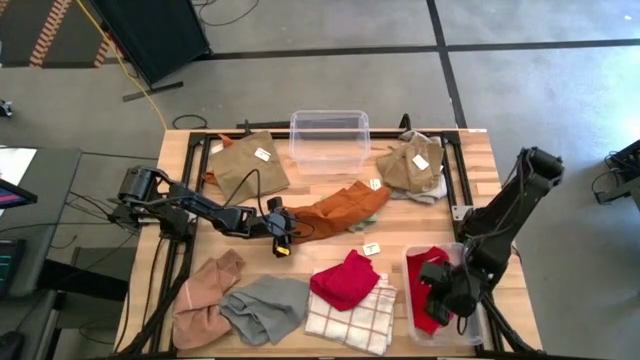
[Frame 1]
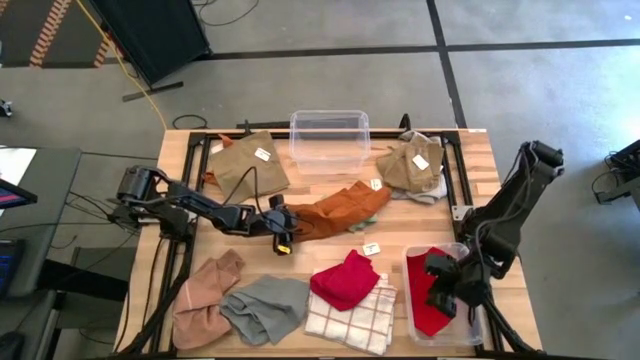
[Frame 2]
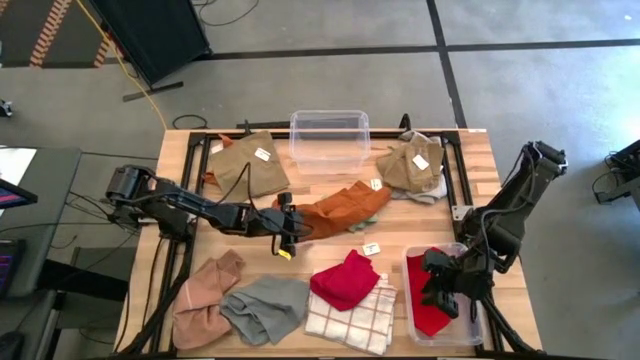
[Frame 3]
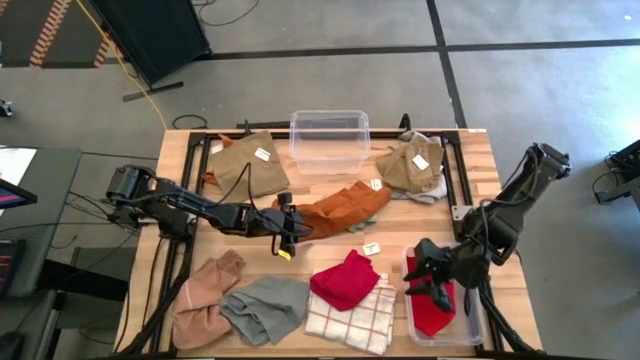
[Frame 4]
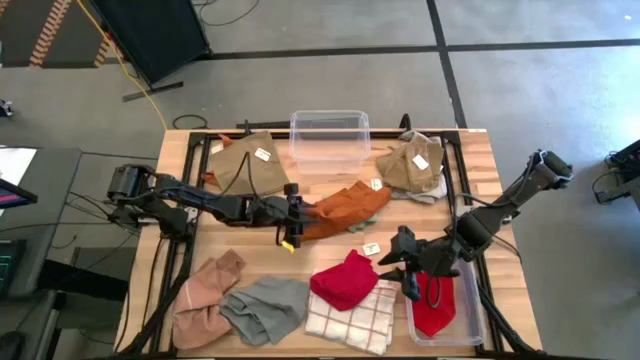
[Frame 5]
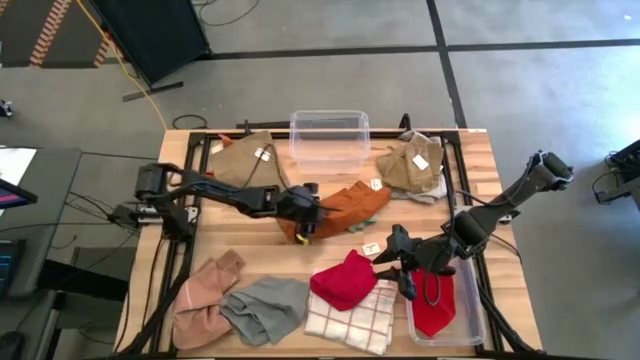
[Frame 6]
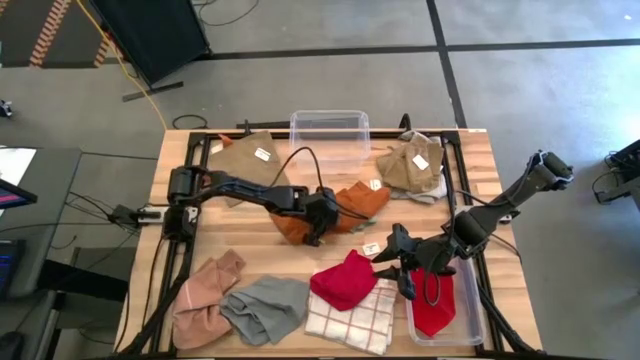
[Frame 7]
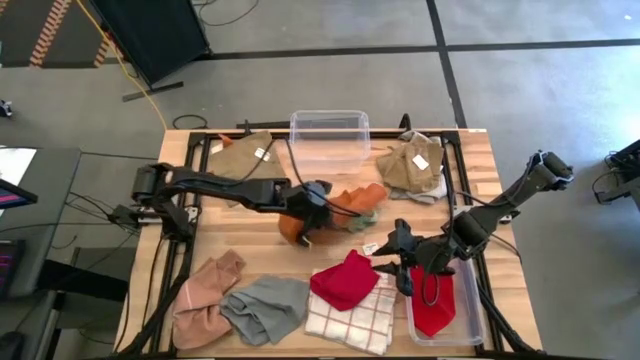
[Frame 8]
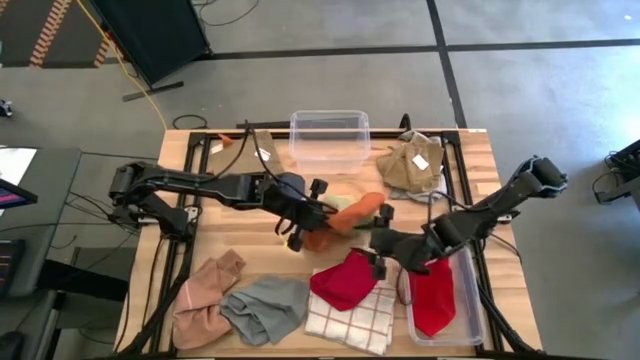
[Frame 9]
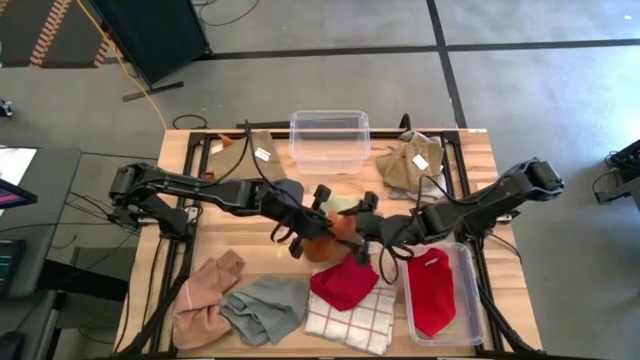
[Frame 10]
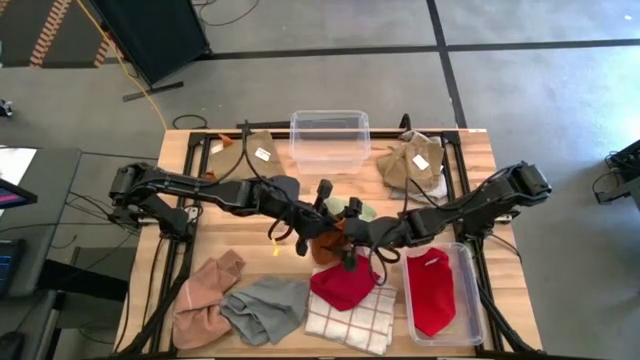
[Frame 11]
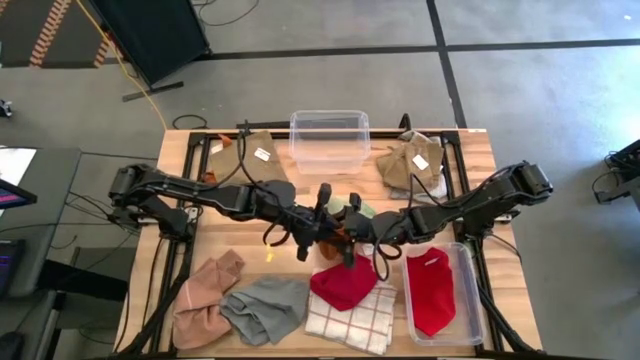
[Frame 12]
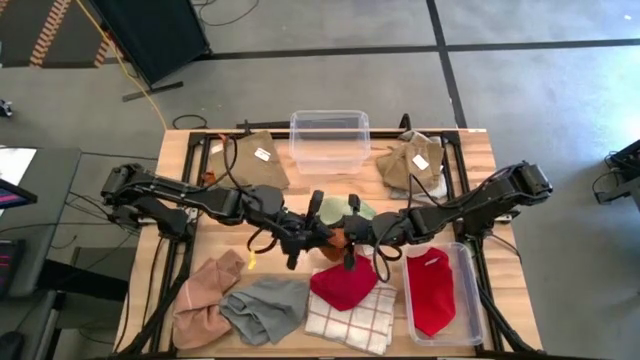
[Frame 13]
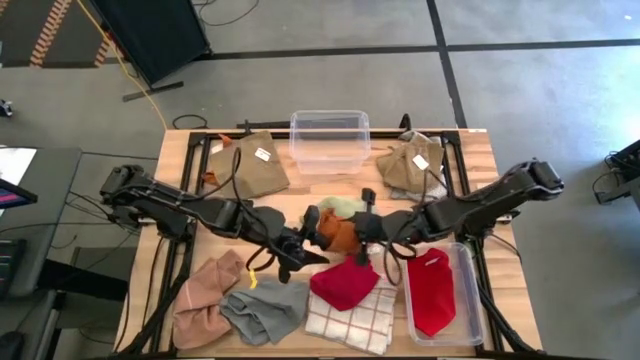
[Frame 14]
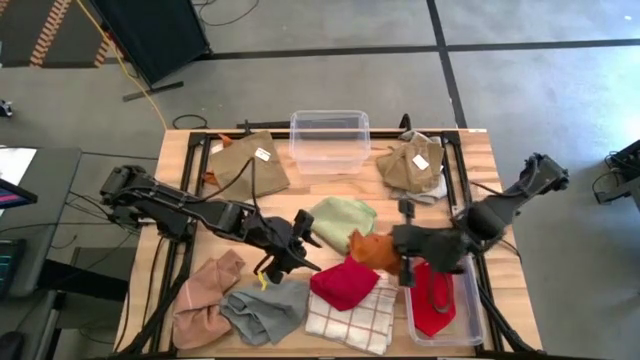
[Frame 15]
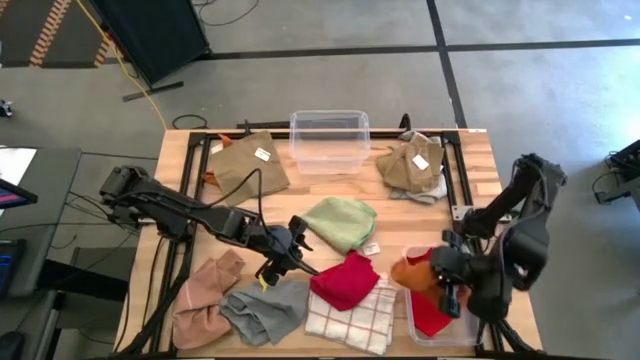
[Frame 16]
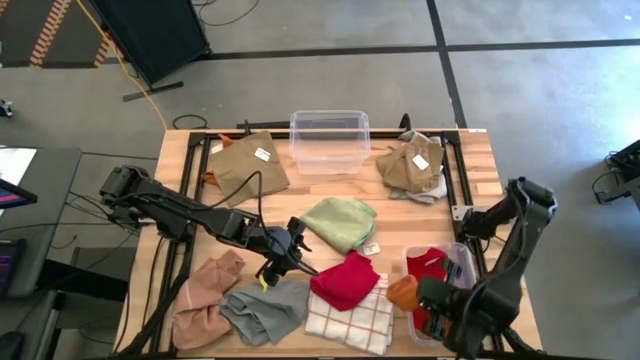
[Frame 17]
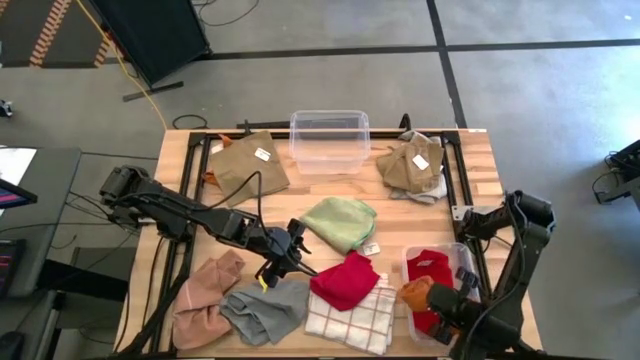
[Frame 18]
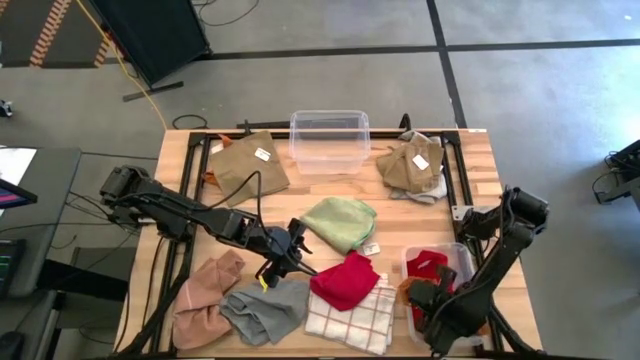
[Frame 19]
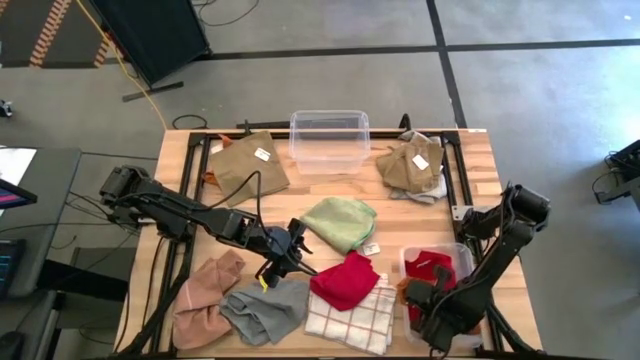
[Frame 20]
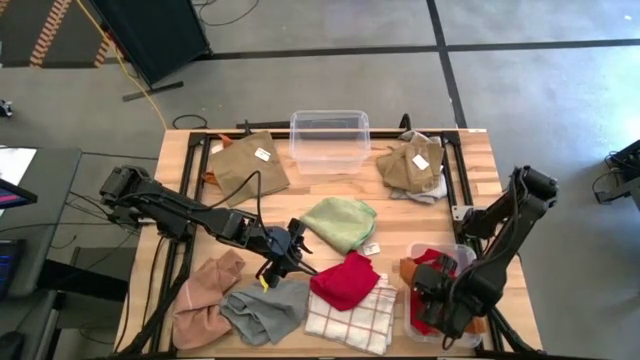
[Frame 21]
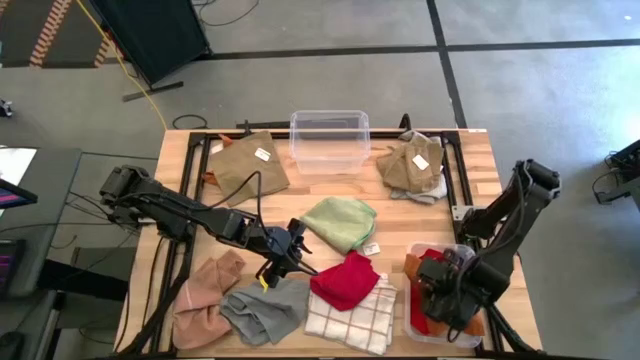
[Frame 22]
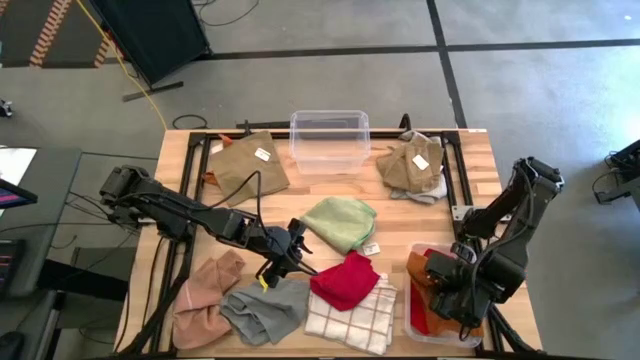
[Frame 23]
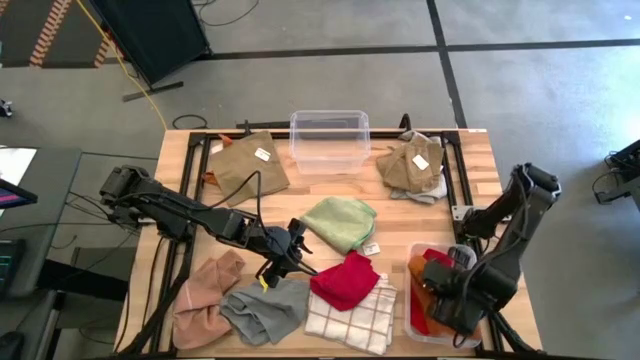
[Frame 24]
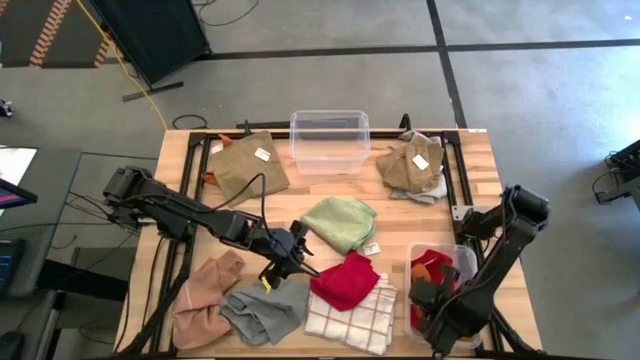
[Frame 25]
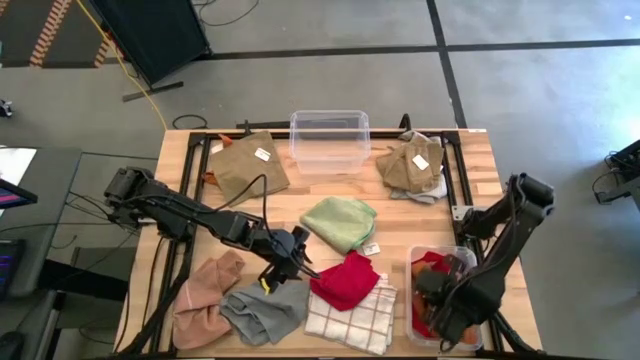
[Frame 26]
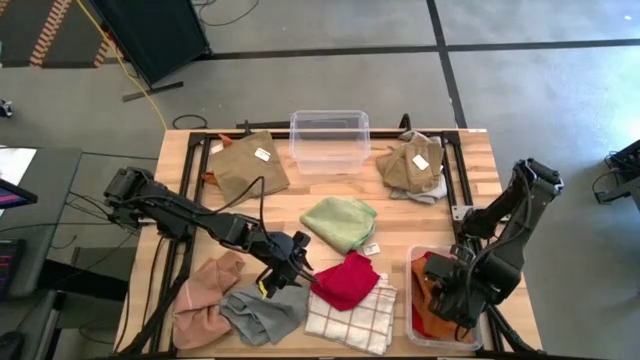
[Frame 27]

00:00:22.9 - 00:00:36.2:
Task: Sort towels by color in basket
Put the orange towel into the bottom transparent bin

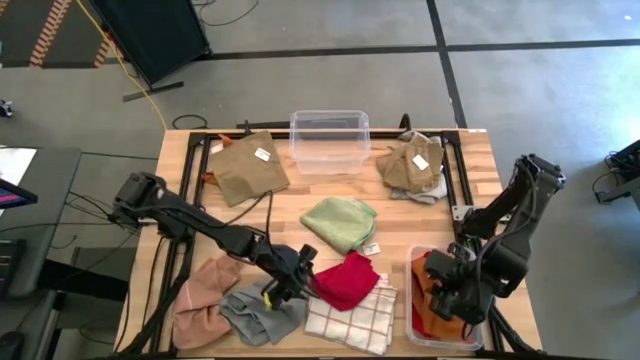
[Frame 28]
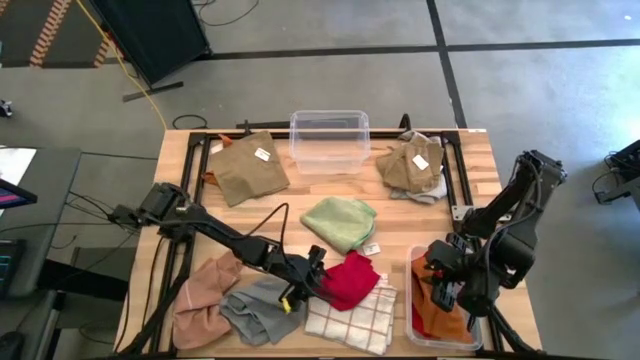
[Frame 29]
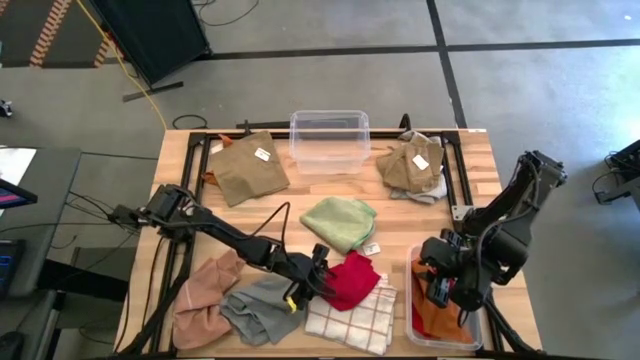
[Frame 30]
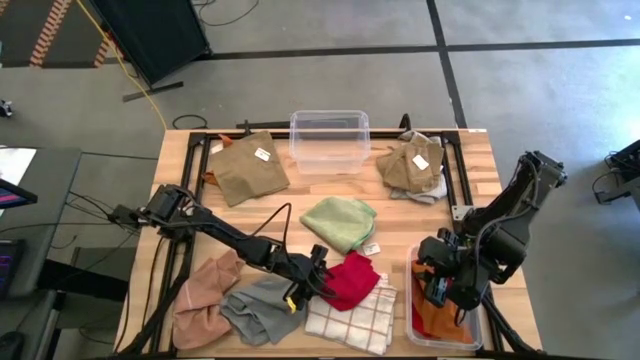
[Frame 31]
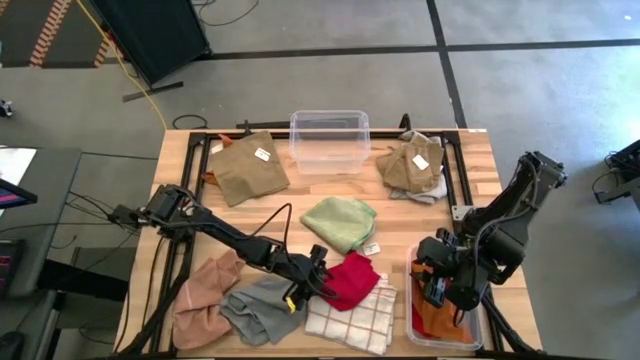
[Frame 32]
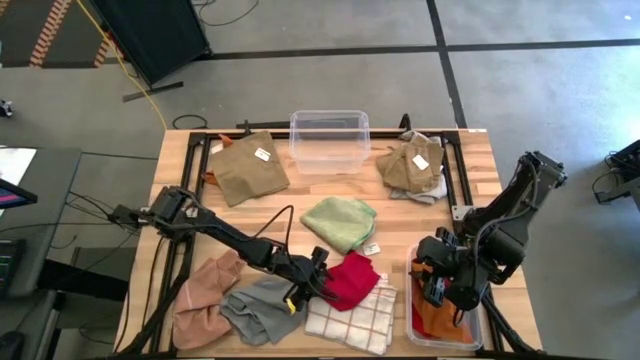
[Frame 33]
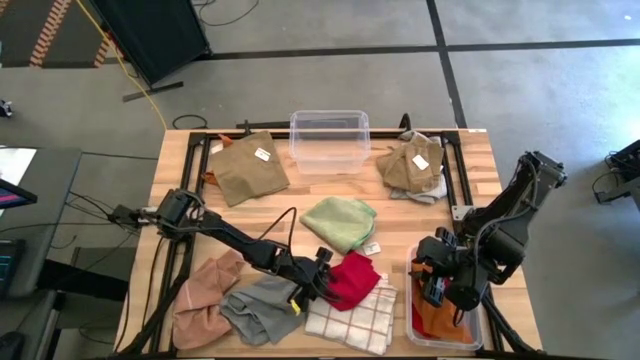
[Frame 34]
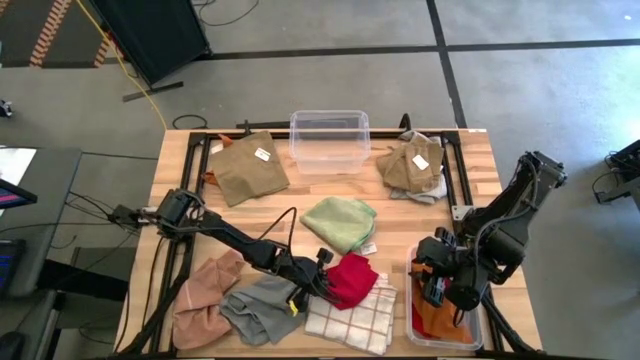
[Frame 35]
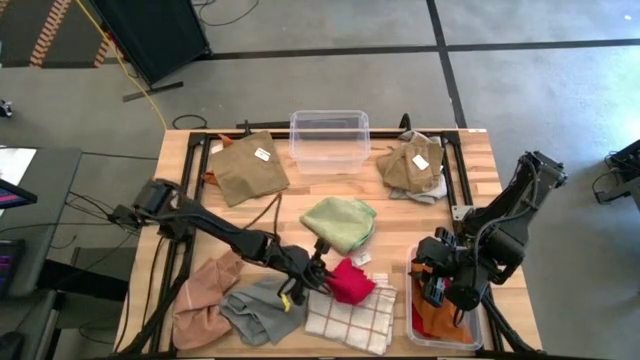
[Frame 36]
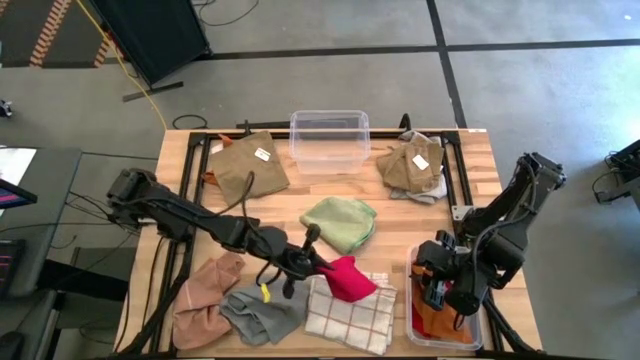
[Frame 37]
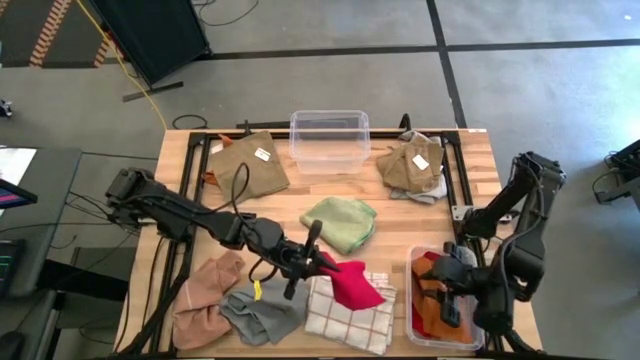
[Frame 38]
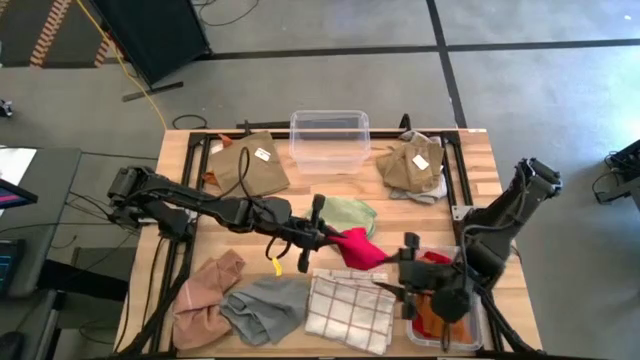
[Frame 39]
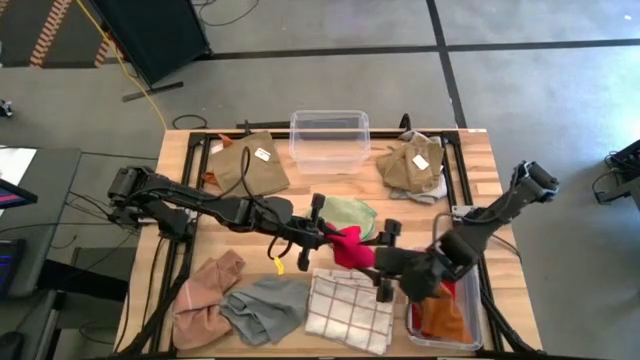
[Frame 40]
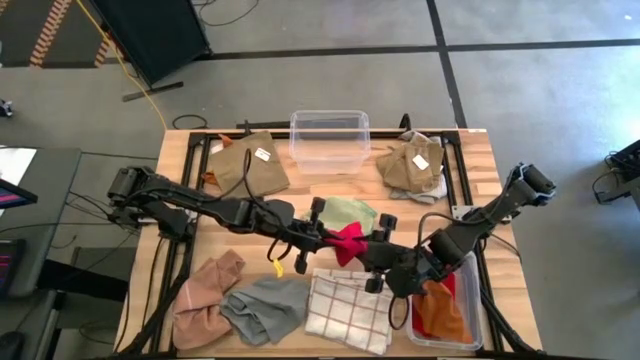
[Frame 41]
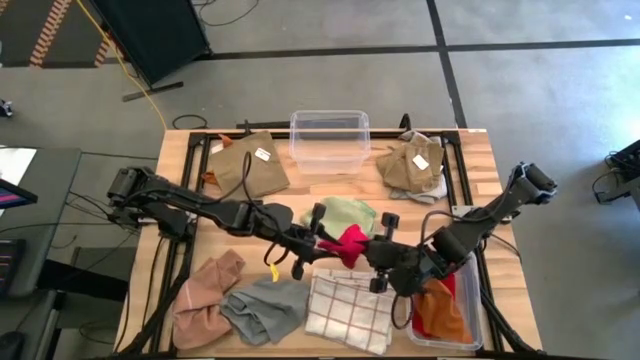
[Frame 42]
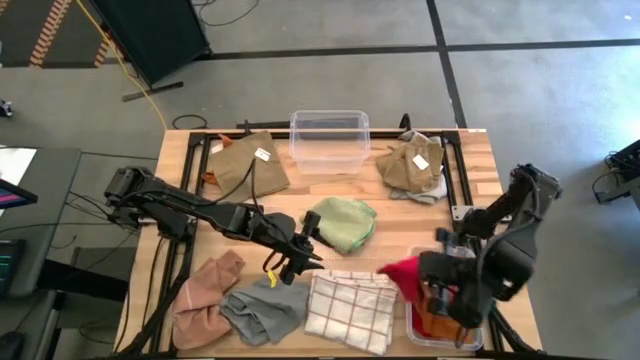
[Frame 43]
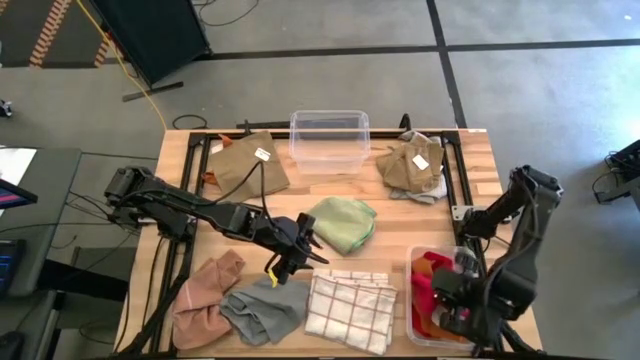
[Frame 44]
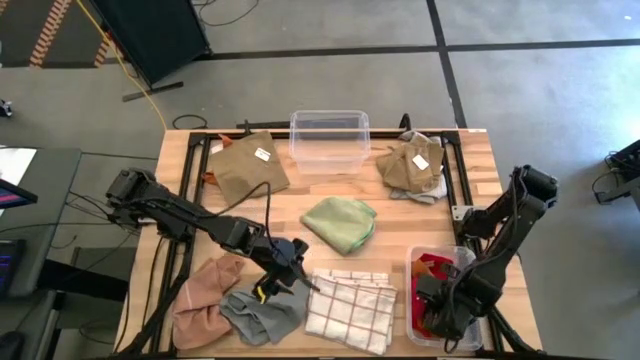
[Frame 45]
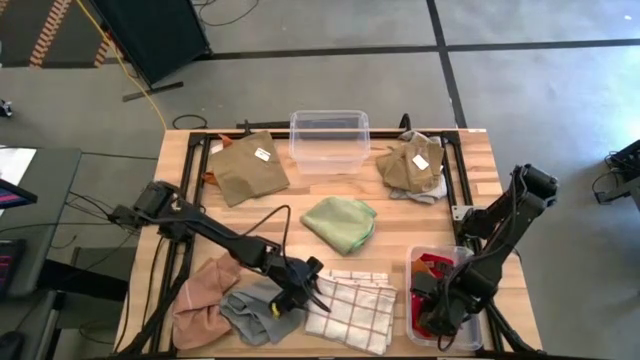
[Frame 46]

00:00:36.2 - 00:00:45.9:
Put the red towel into the bottom transparent bin
